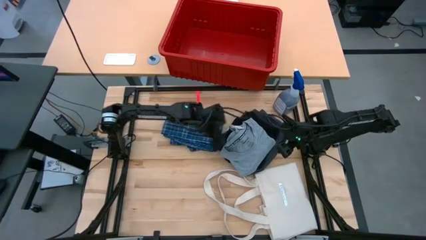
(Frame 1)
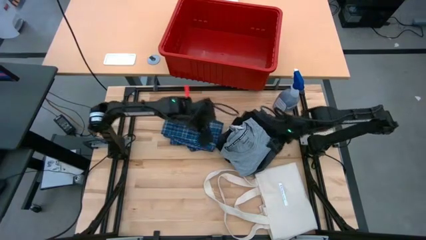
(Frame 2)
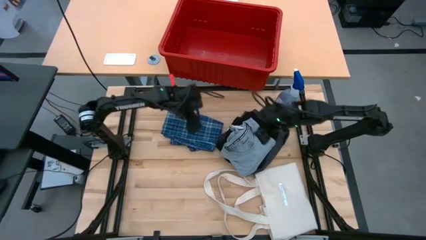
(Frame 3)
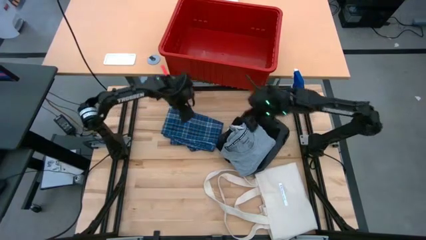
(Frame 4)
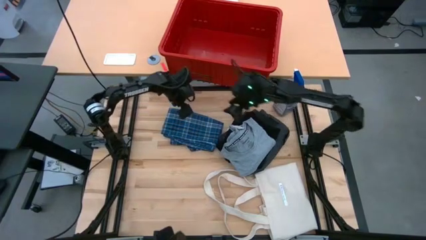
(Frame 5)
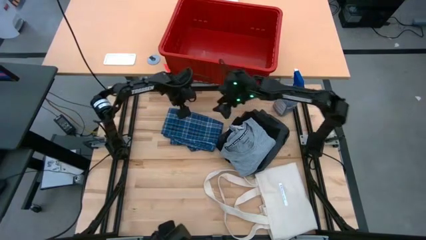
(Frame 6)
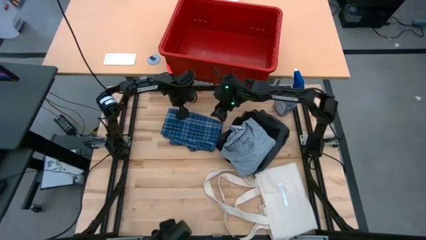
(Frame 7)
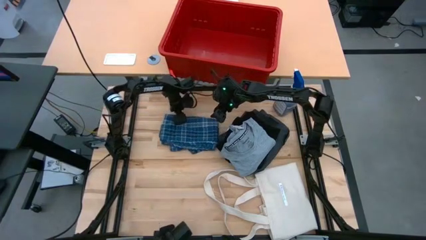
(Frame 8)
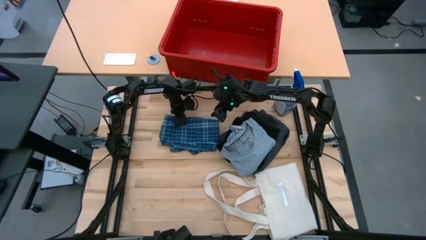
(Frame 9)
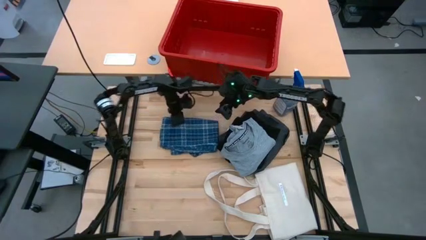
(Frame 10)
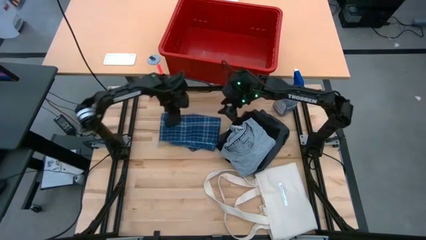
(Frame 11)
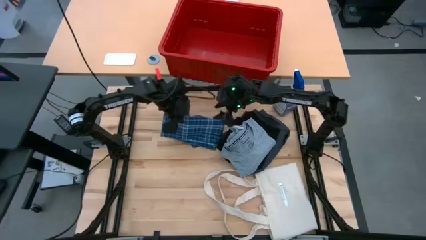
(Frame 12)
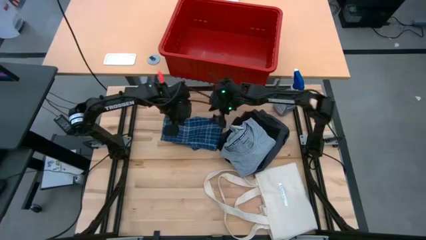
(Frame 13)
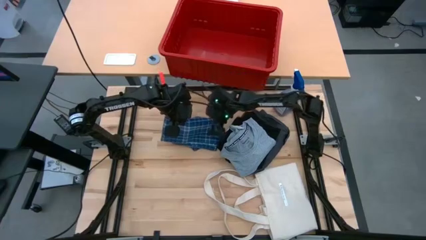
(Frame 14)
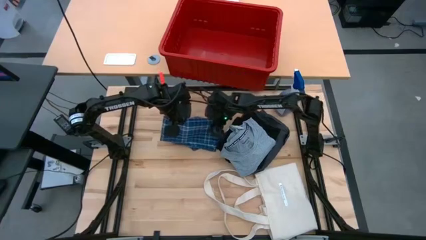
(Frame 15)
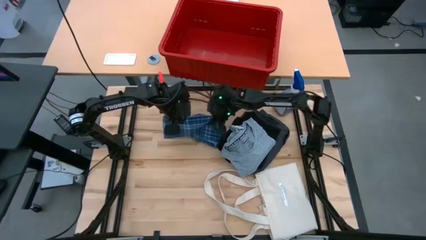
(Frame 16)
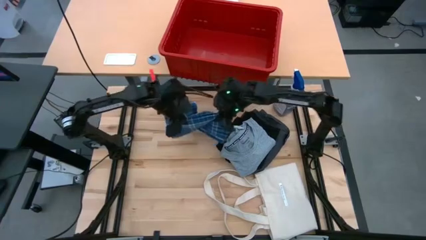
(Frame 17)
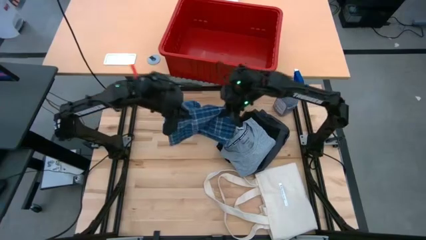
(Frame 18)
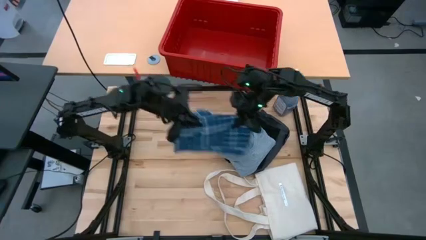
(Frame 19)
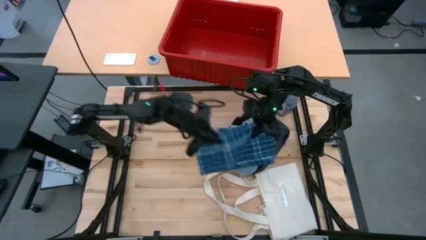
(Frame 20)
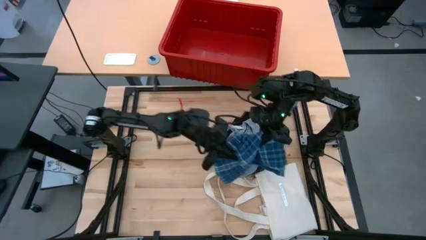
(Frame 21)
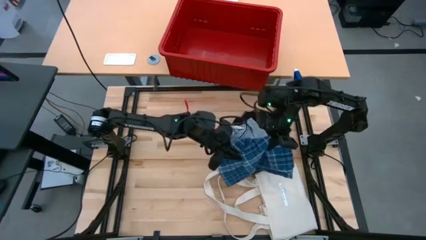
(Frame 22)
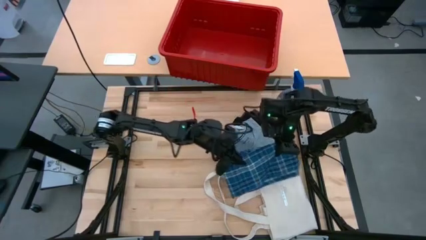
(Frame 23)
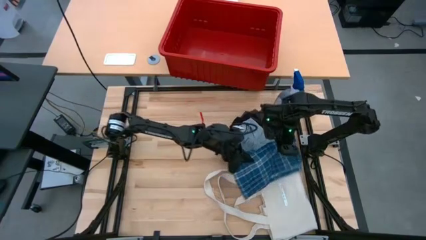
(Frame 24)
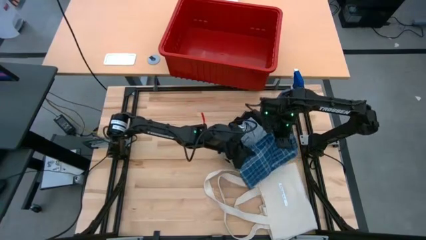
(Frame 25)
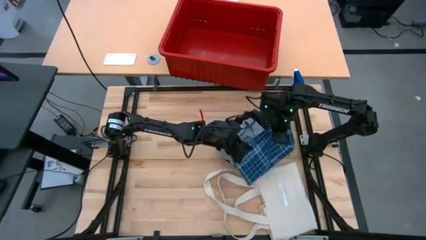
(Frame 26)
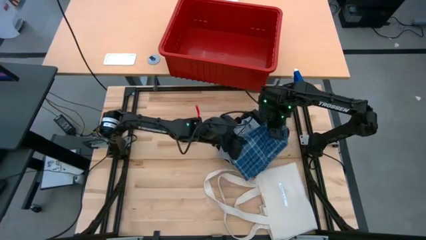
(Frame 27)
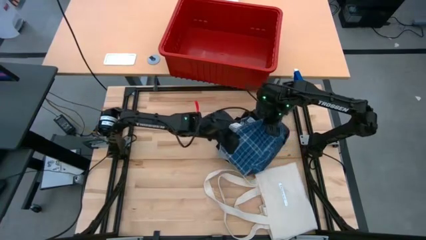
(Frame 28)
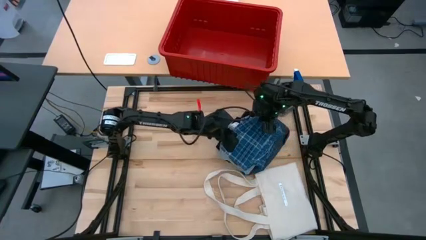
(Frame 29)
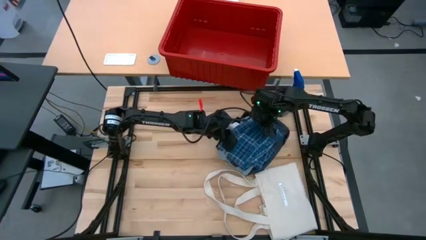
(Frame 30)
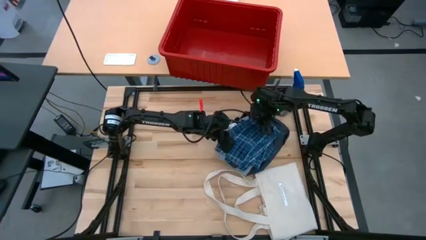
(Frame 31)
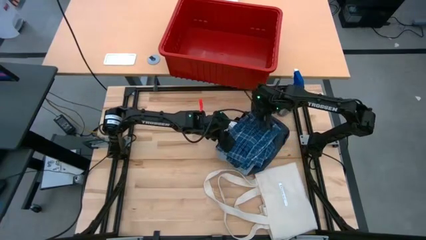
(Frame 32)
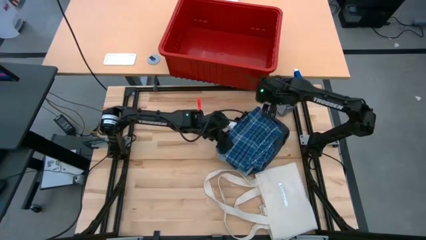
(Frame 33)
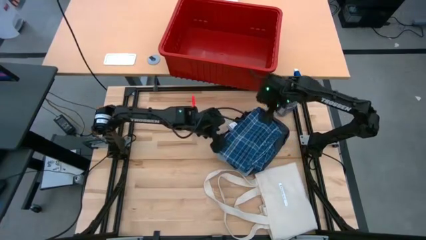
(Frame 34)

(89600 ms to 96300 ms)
Task: Fold laundry
Stack the blue polo shirt on top of the gray shirt

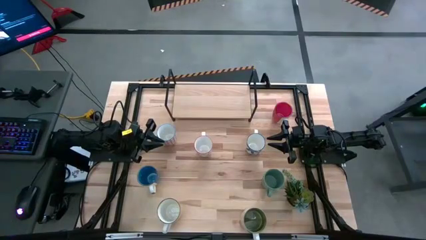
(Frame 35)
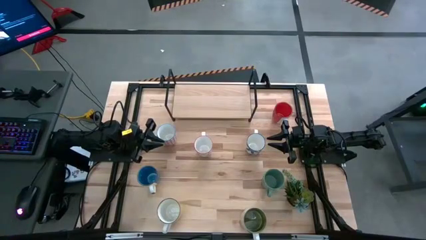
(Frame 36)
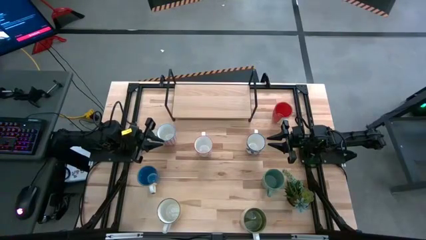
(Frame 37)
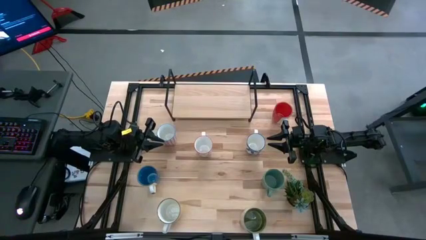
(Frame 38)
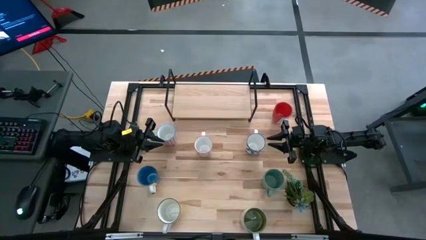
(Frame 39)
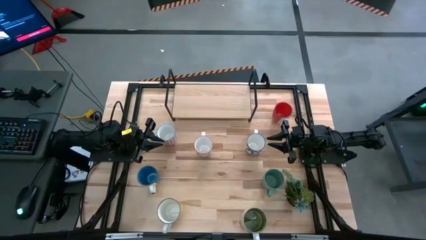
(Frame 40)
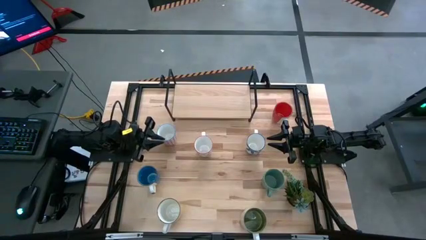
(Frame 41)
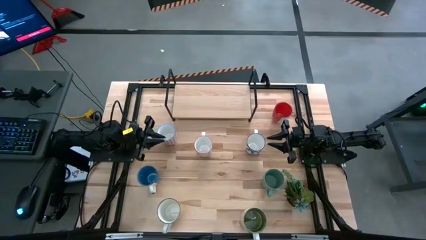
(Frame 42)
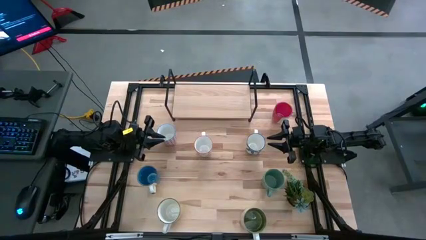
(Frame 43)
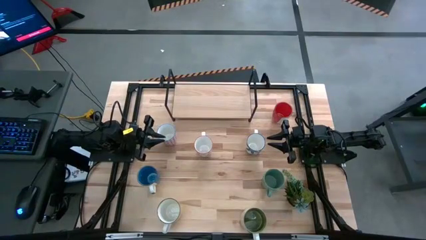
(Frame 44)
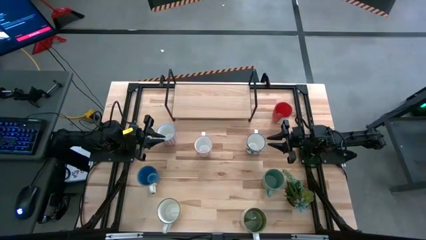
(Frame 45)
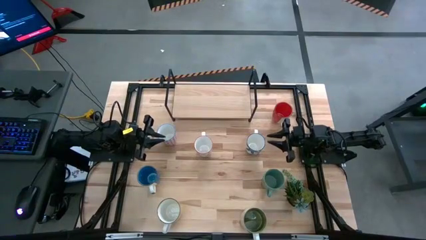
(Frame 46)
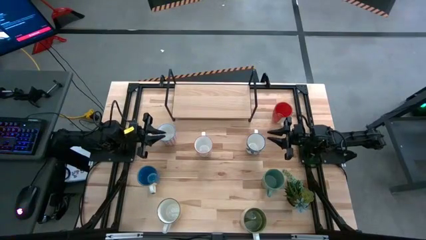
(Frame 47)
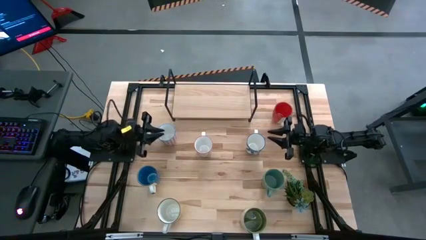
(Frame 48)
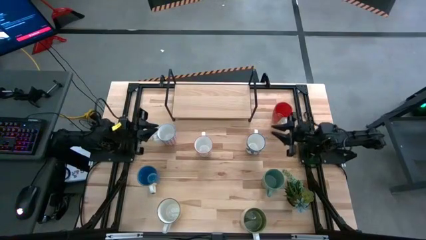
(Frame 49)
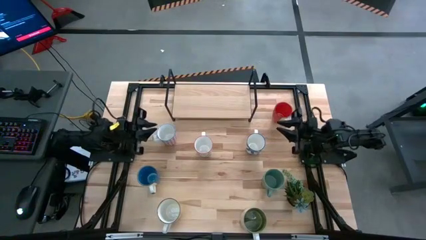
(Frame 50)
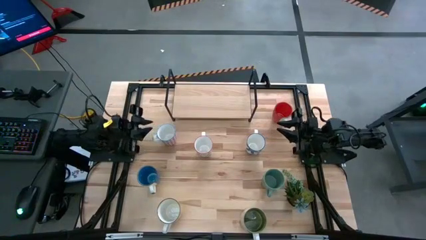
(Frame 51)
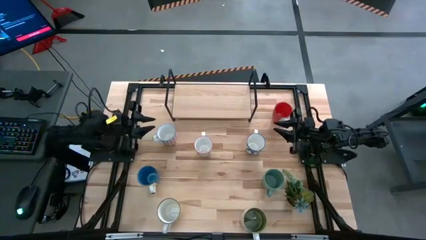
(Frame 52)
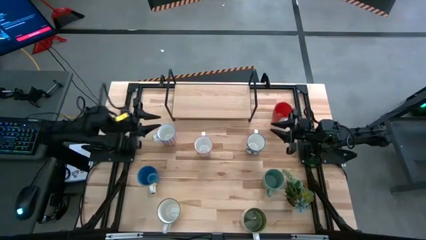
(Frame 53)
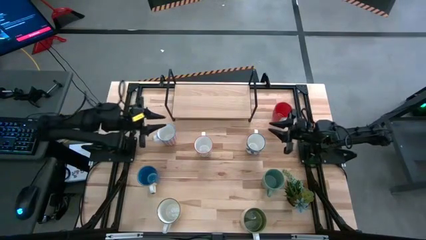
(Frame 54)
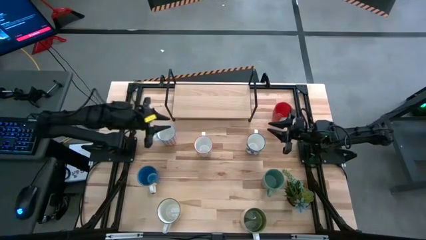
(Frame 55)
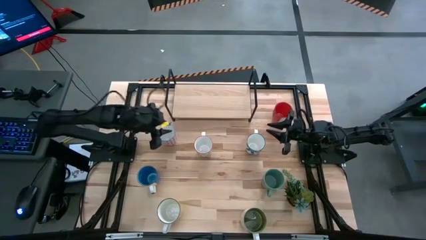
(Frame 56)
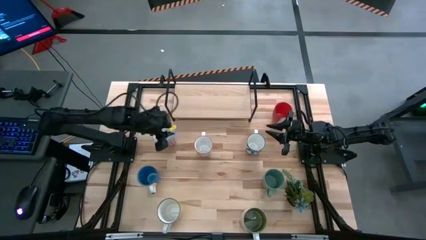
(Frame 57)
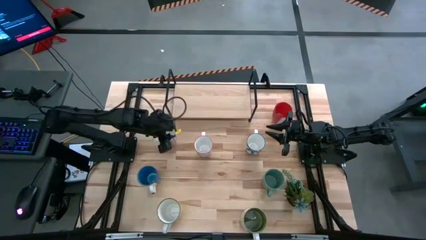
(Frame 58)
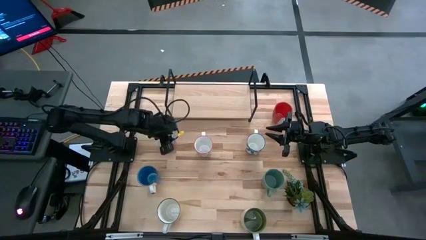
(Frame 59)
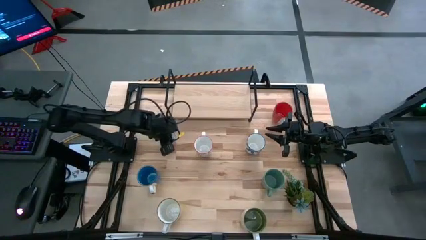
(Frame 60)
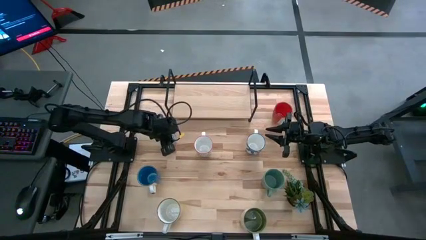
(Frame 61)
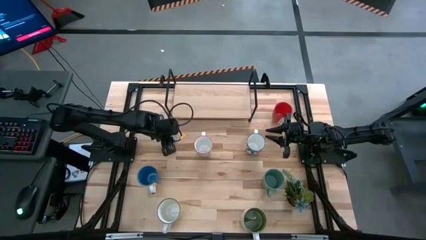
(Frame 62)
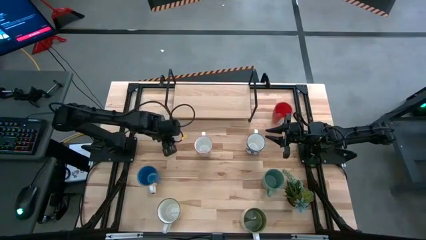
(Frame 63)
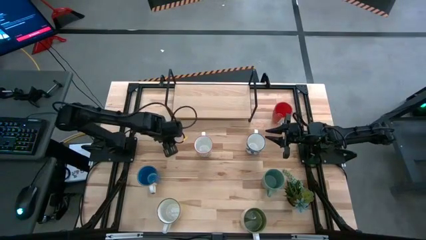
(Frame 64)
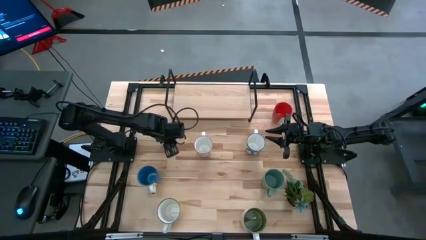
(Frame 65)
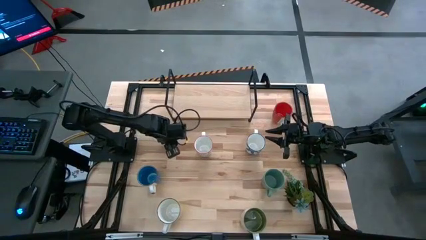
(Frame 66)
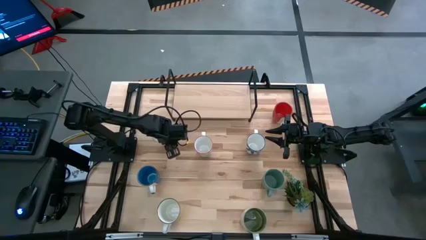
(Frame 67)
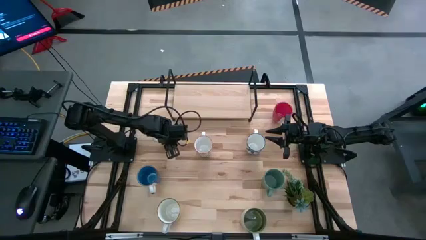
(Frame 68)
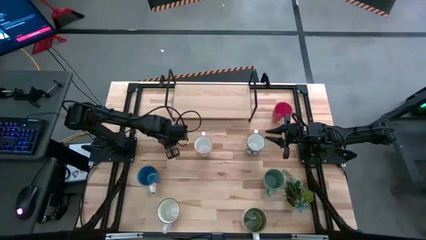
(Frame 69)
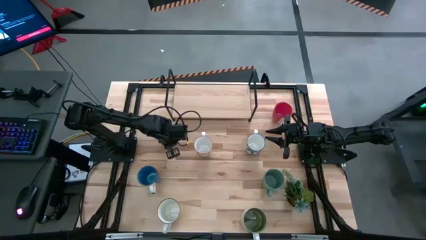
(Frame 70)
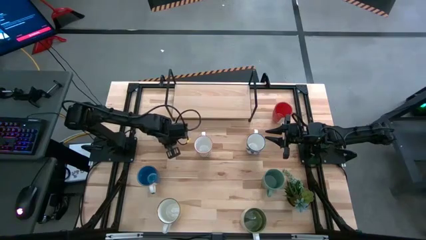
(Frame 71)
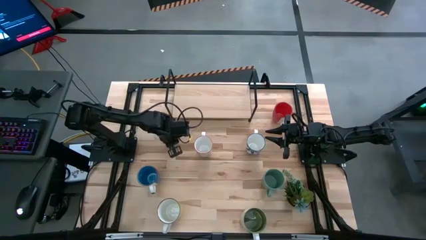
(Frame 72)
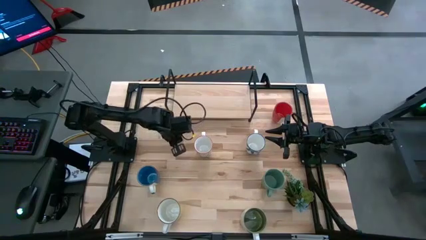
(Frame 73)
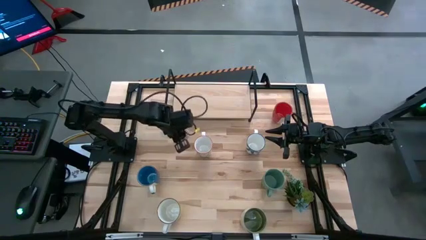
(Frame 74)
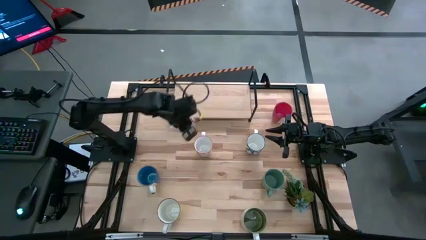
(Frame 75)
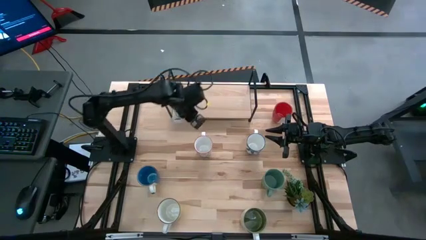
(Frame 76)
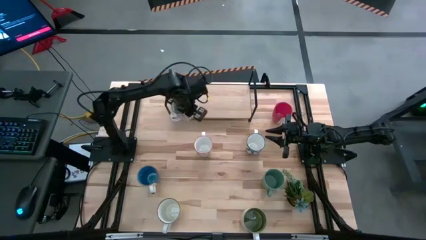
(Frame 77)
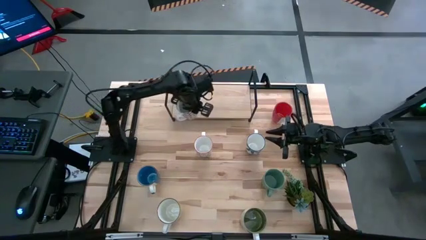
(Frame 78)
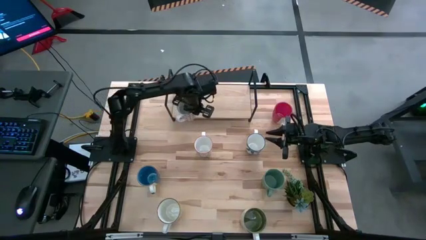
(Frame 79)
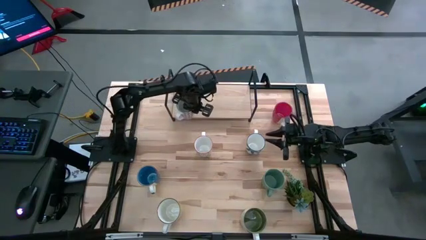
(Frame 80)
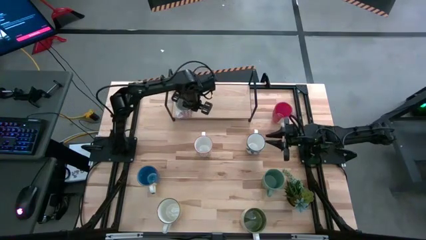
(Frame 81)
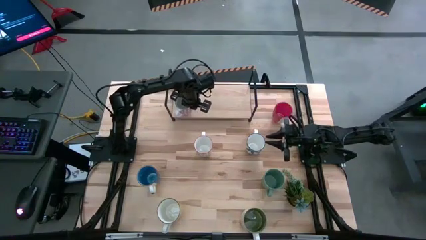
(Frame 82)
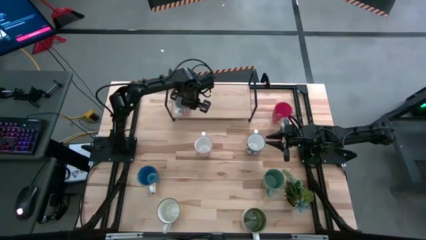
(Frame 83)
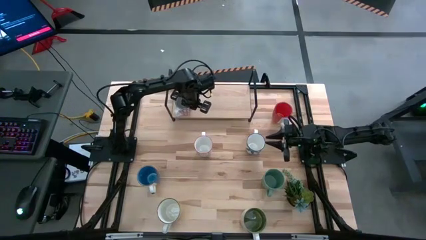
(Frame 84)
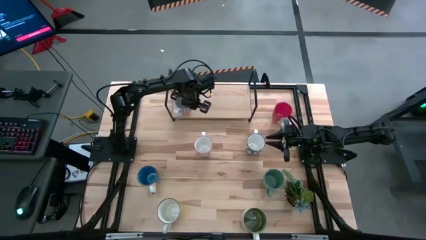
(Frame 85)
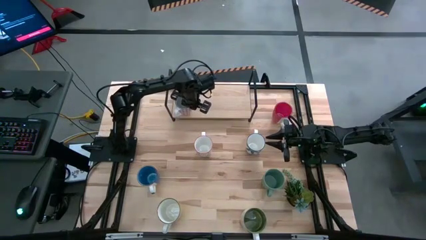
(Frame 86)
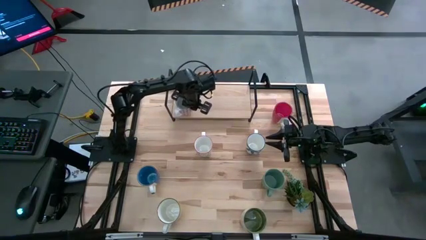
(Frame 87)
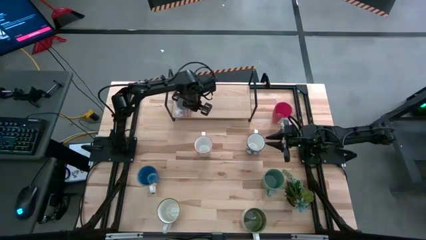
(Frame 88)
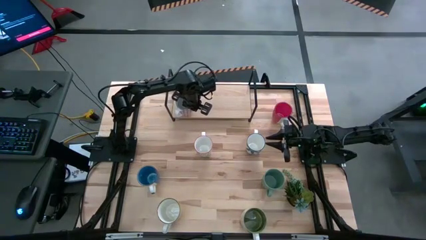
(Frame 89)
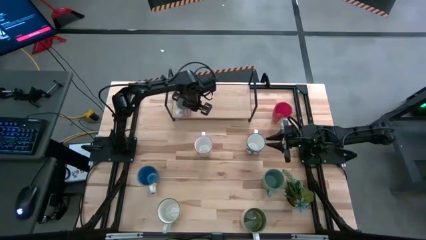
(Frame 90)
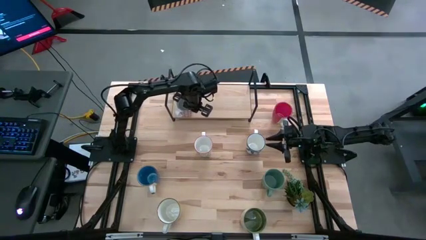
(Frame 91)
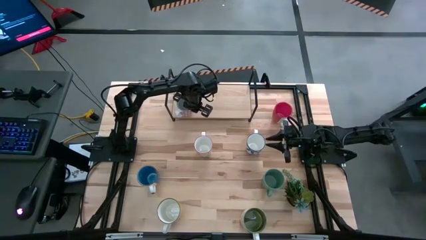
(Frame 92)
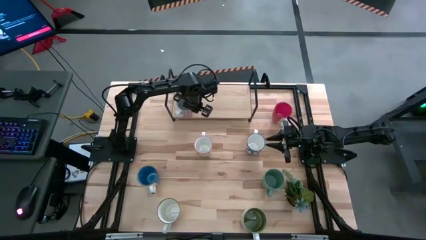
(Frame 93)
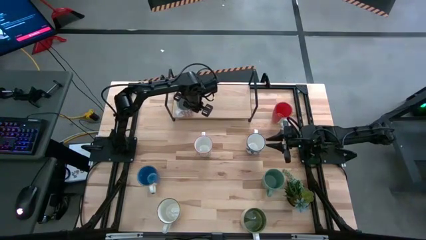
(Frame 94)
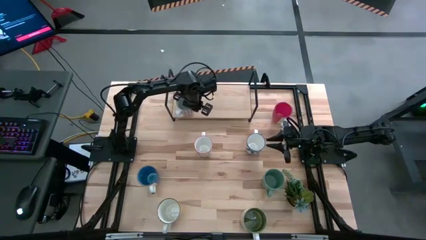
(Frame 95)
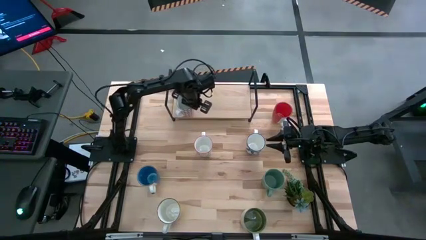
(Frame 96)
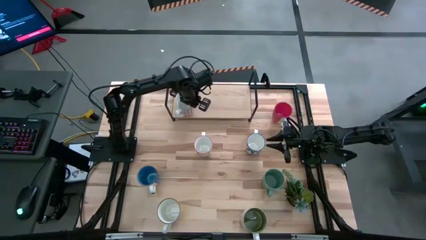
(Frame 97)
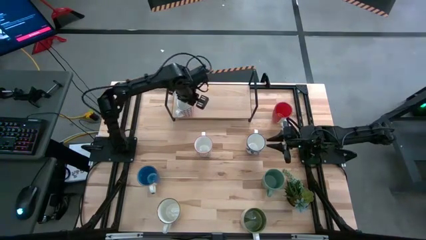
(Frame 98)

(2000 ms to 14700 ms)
Task: Place coffee mugs
Put the red patterned mug on the shelf
